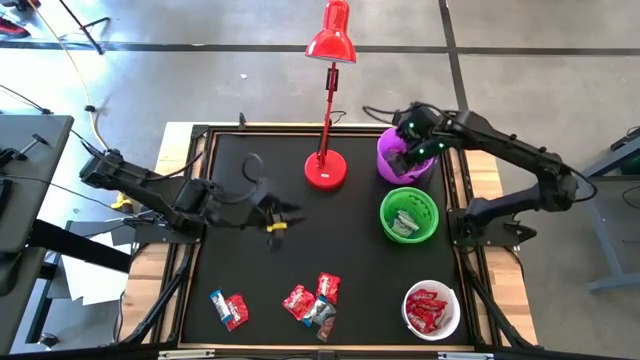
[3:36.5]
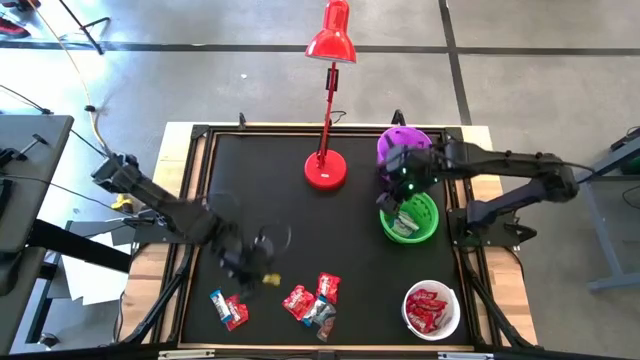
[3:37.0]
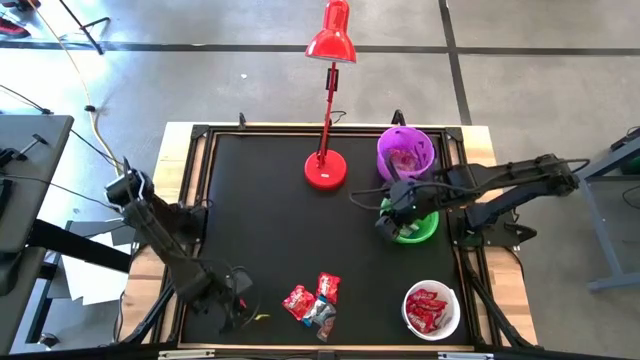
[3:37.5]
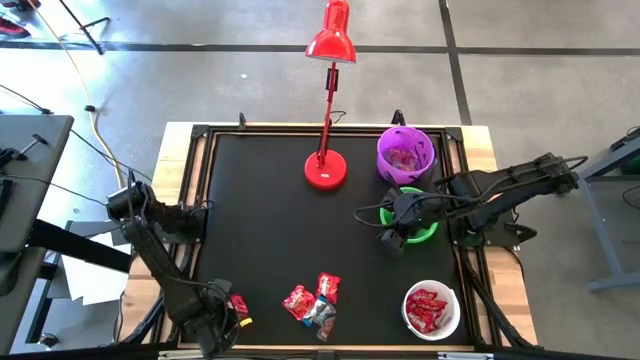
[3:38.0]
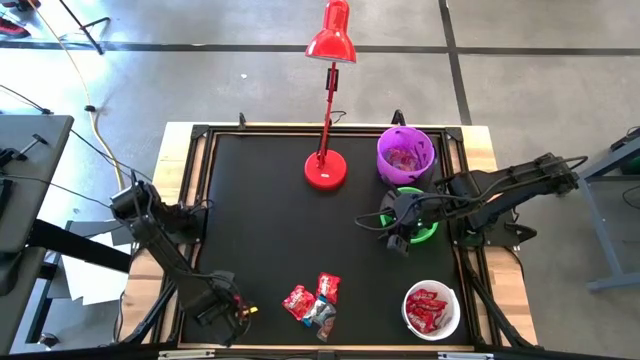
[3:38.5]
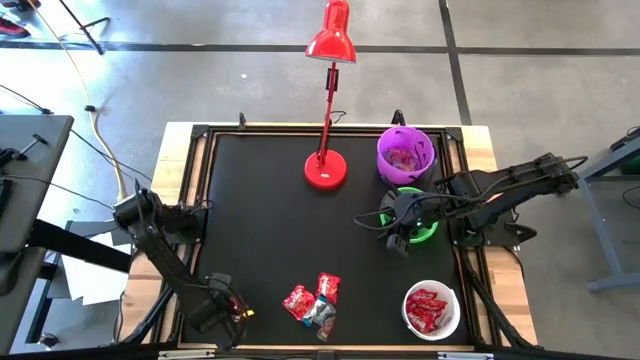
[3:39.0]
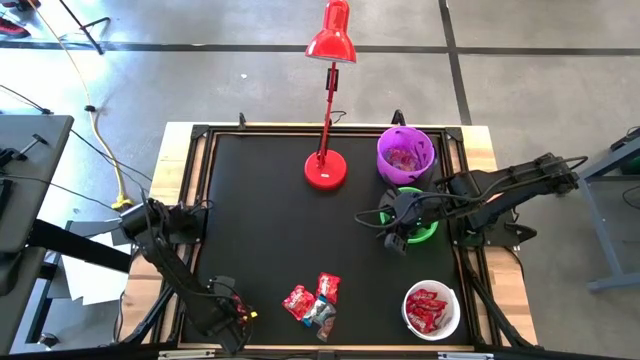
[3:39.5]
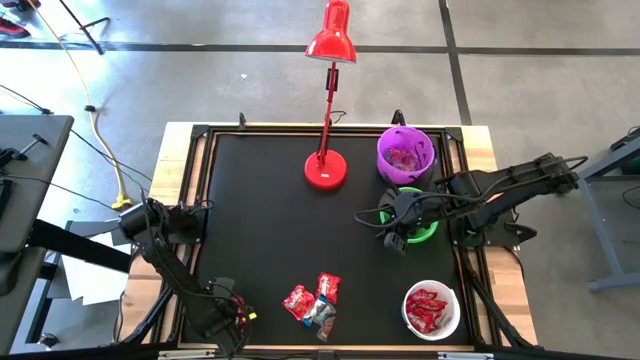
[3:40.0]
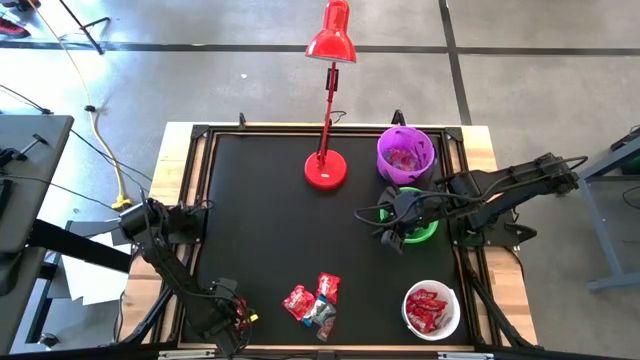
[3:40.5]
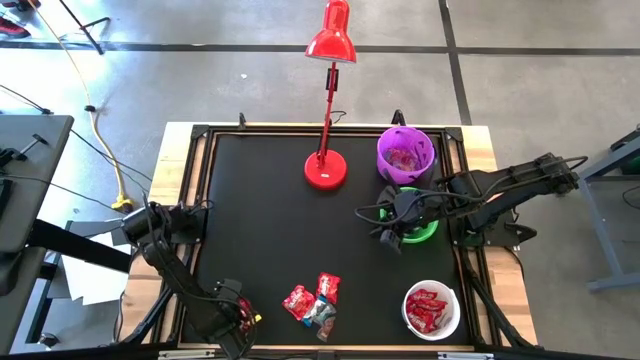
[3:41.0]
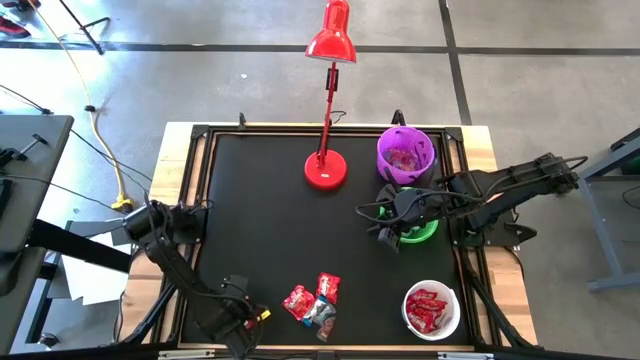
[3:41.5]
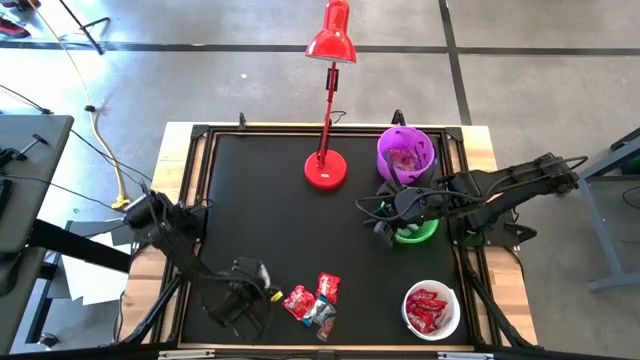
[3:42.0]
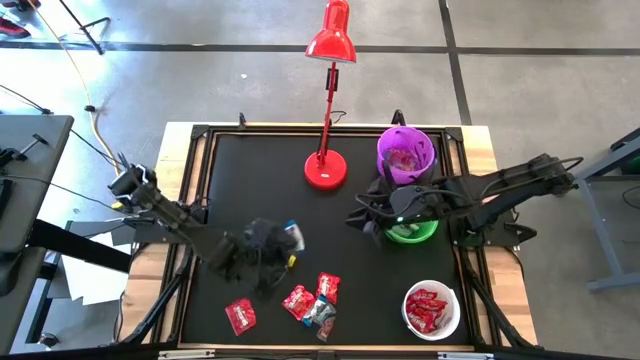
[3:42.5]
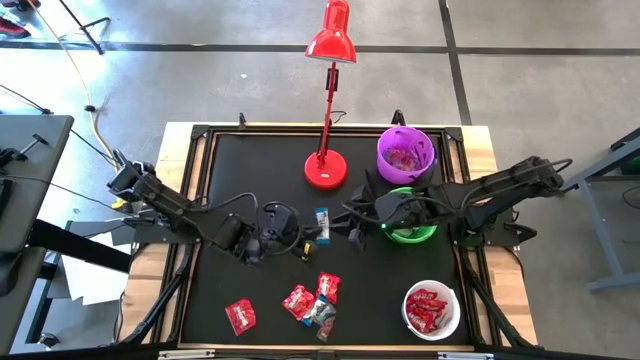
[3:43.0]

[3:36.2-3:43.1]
Task: Organize candy in baskets
Put the white chocolate bar into the green bucket

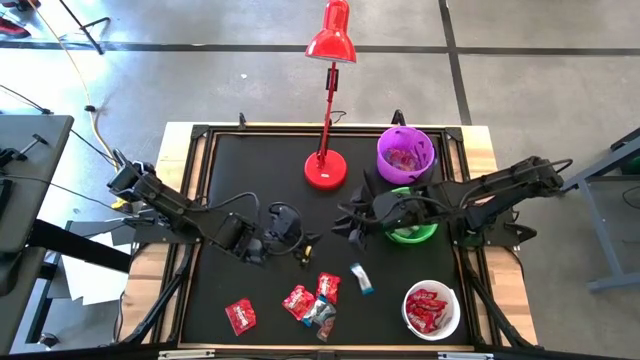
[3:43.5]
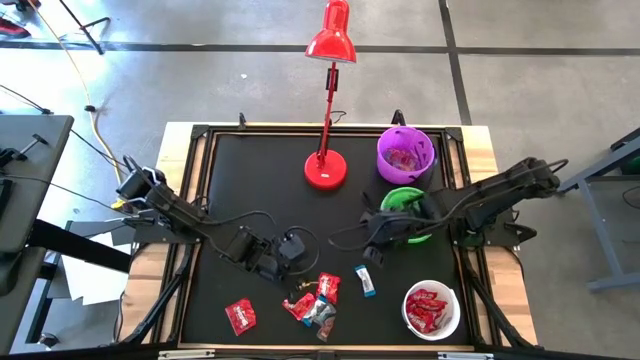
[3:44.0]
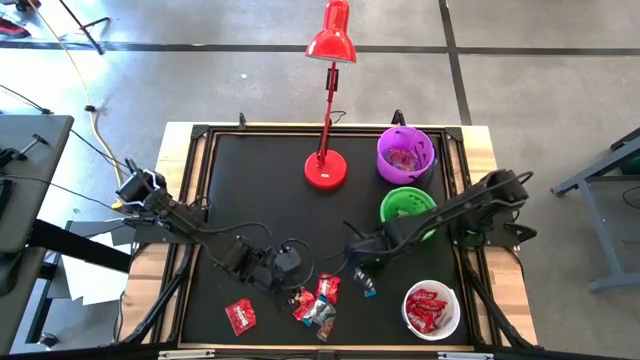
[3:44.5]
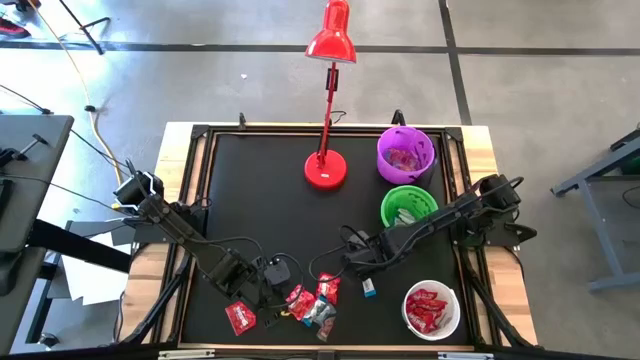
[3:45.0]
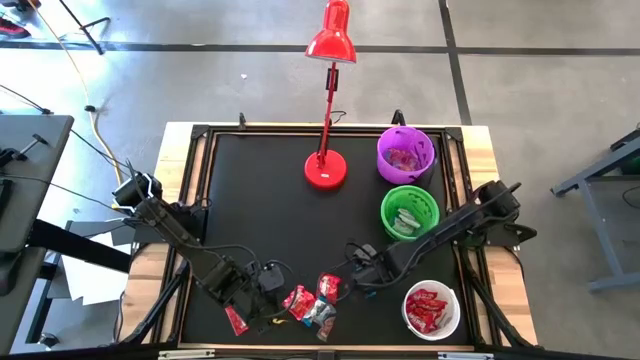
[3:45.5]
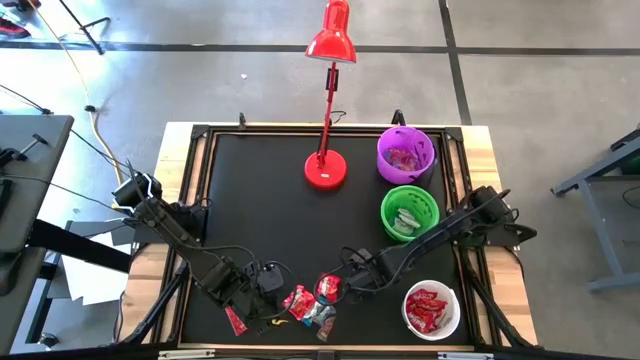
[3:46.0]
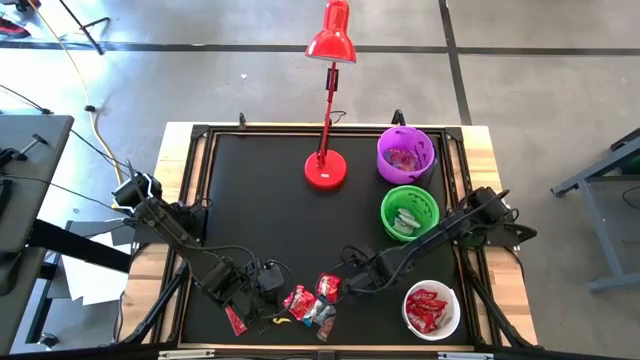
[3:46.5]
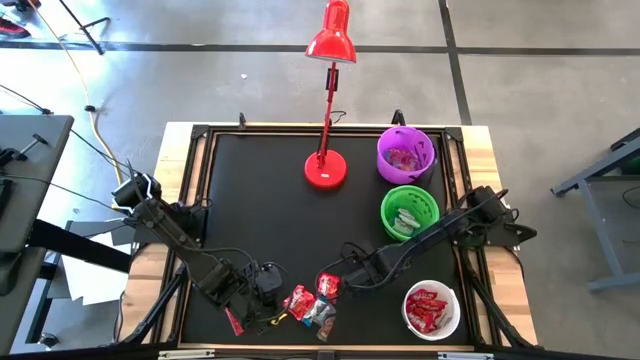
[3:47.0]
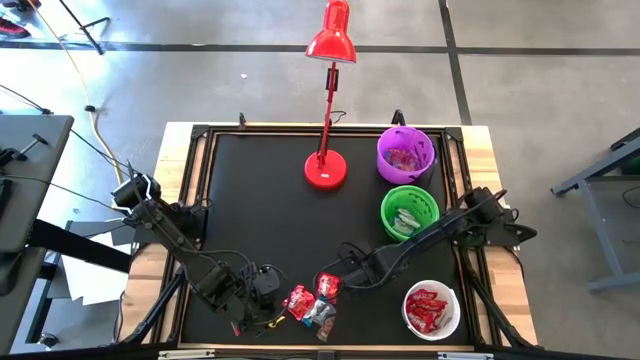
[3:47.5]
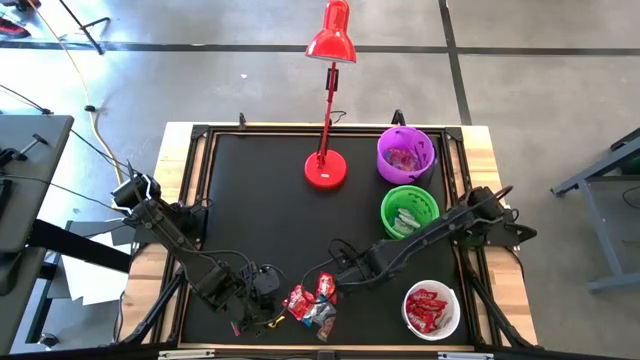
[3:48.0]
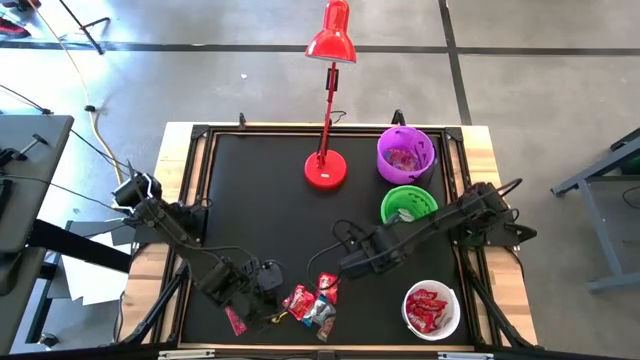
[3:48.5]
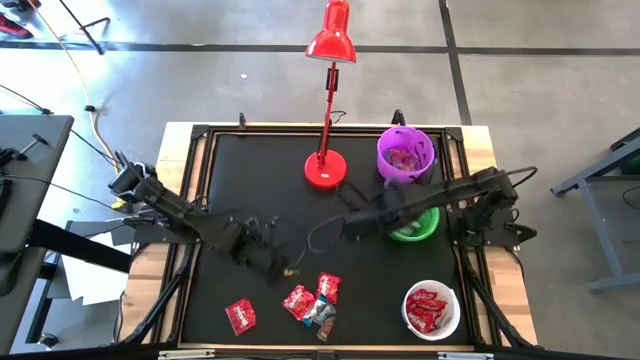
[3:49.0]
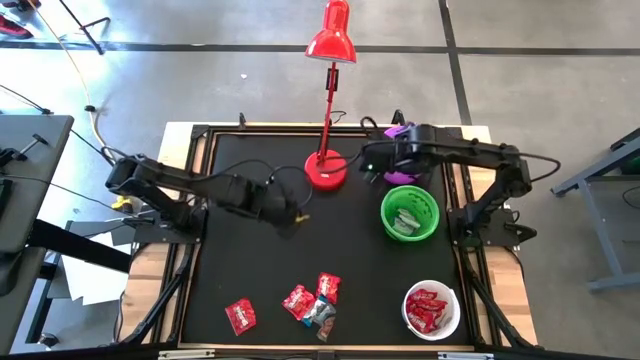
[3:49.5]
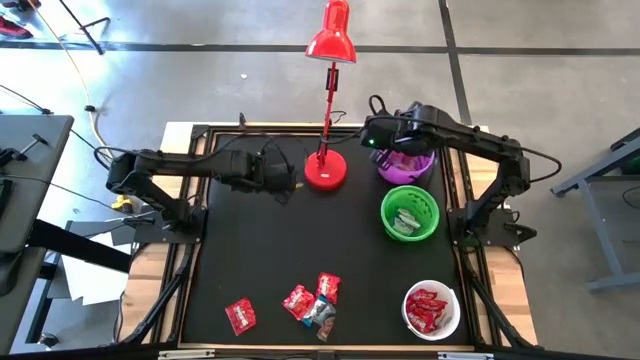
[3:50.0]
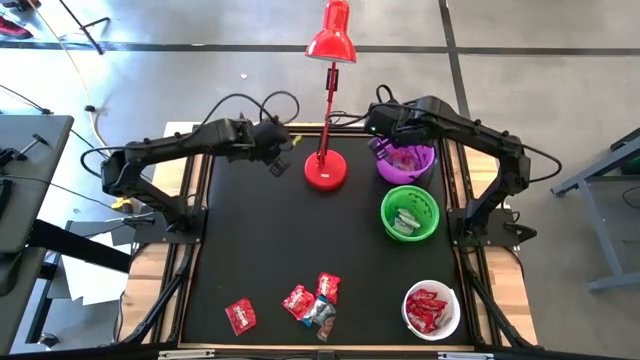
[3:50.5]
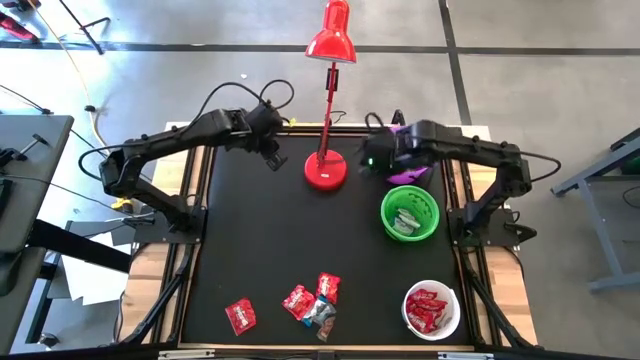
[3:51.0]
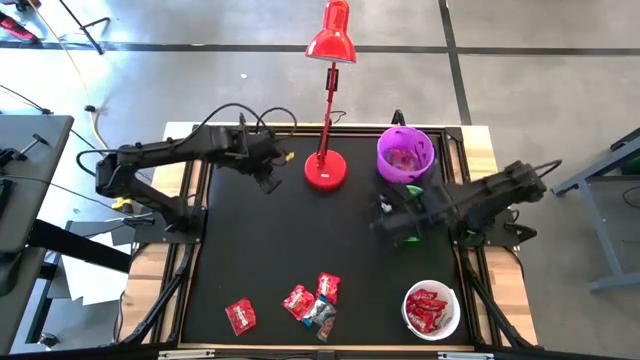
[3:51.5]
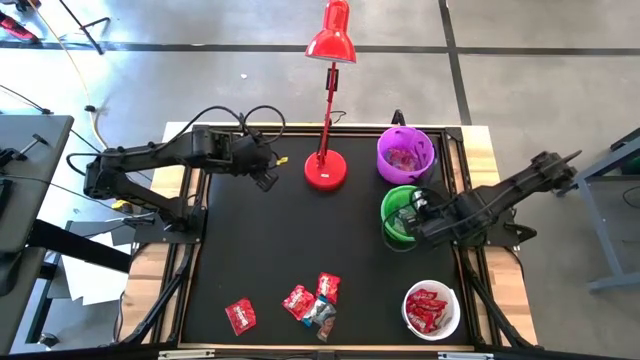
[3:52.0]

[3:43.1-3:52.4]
Put the white chocolate bar into the green bucket

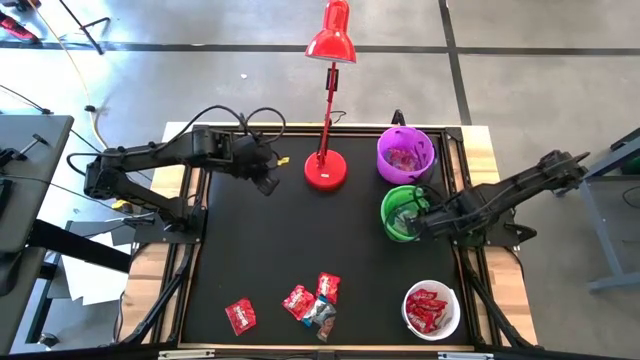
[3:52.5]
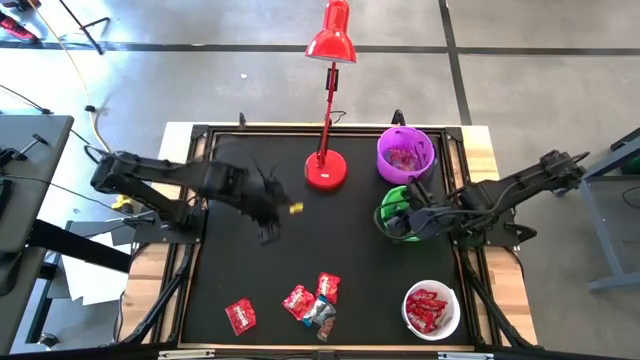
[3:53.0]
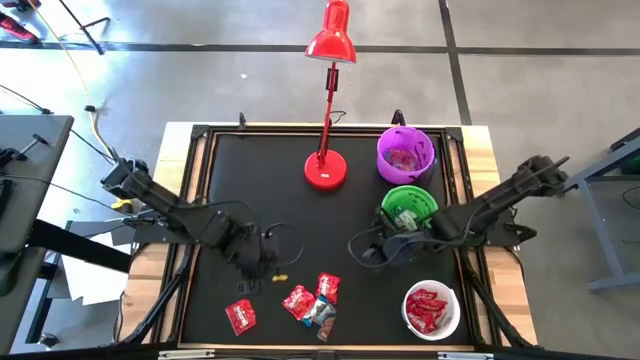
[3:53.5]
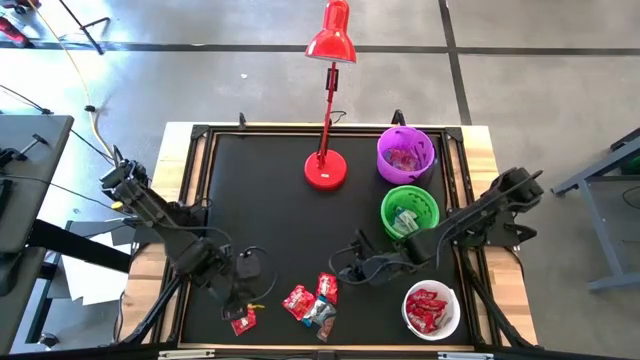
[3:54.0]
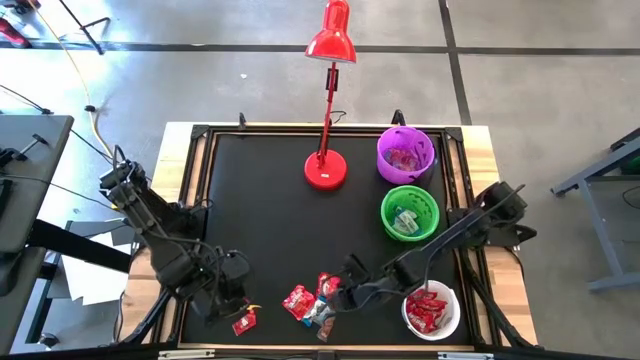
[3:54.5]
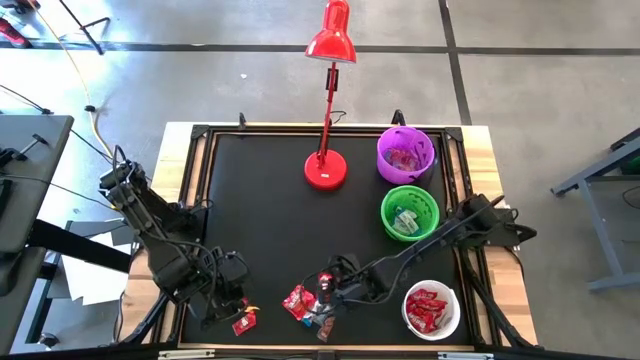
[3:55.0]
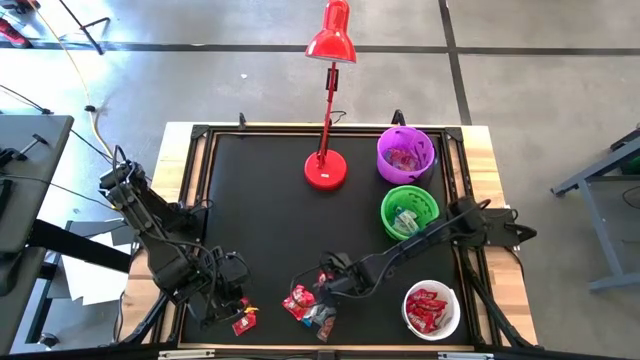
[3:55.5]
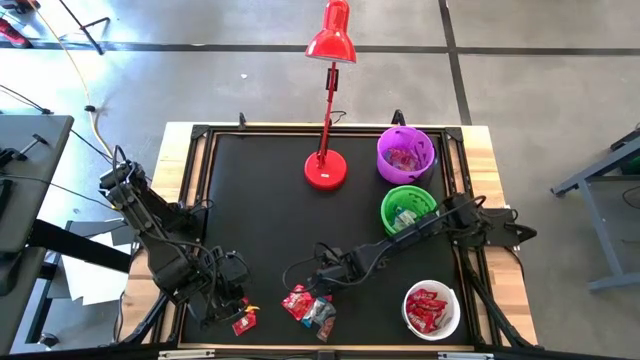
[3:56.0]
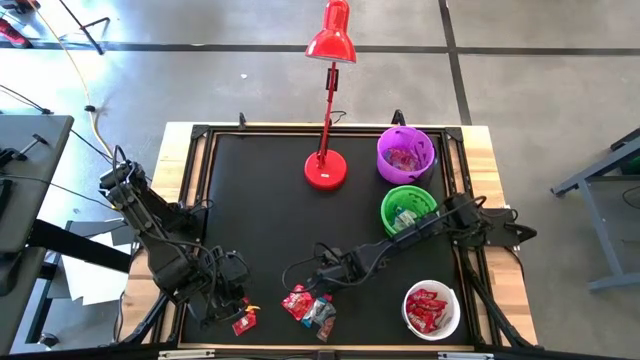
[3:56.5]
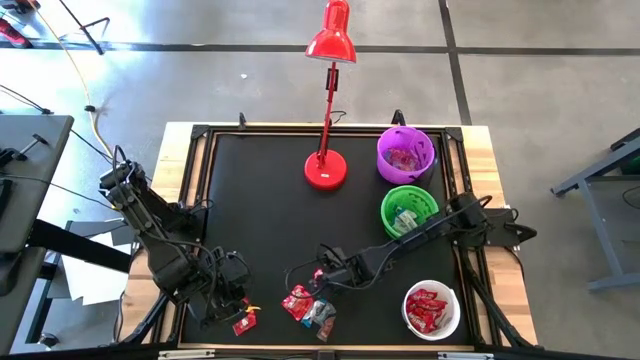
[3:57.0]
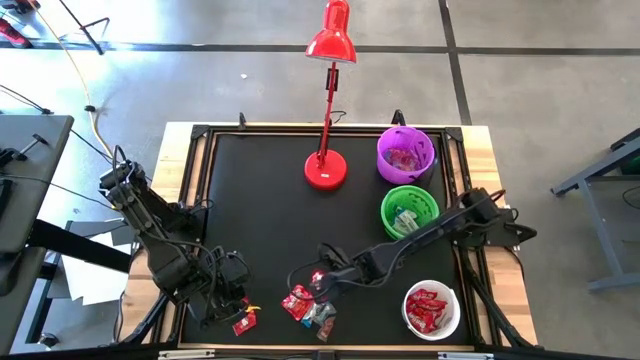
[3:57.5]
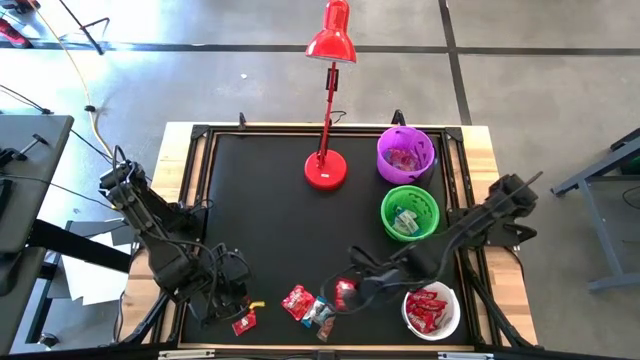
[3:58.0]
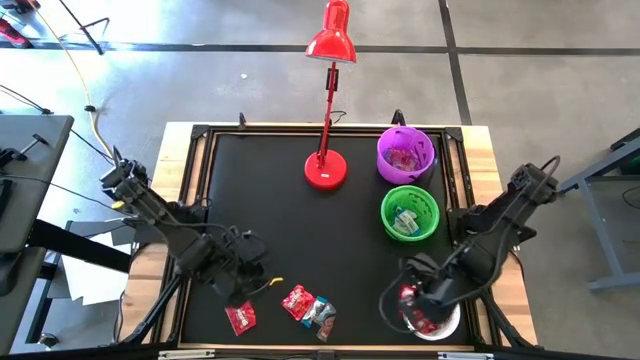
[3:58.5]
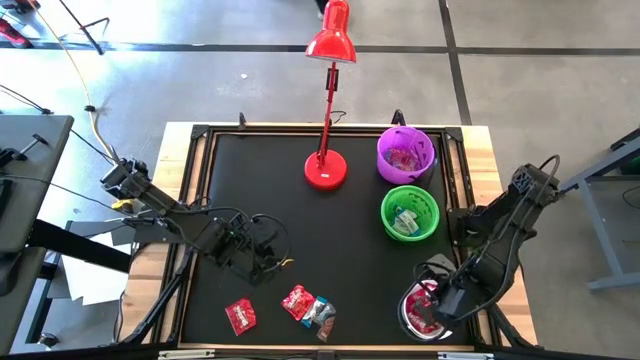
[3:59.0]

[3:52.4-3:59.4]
Put the red candy into the white bucket
